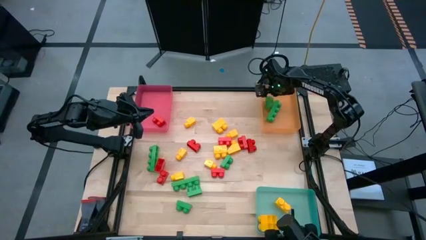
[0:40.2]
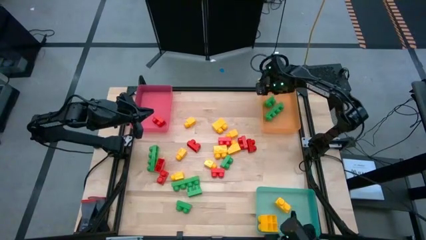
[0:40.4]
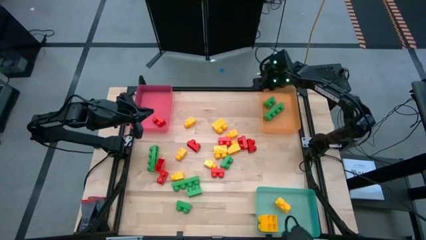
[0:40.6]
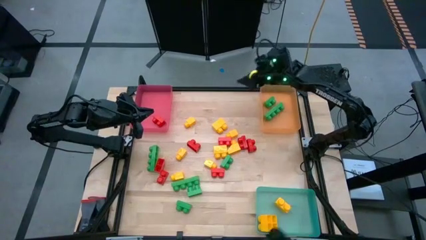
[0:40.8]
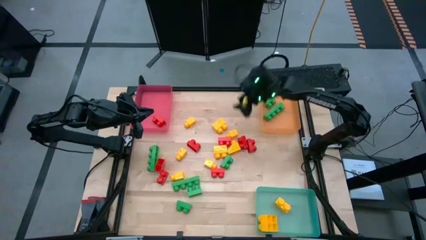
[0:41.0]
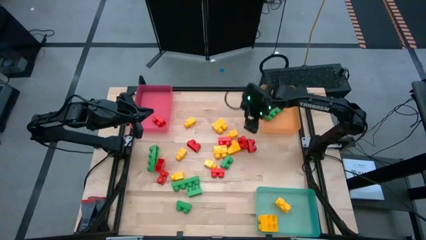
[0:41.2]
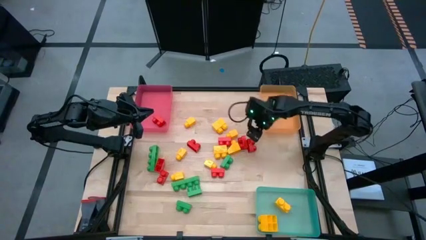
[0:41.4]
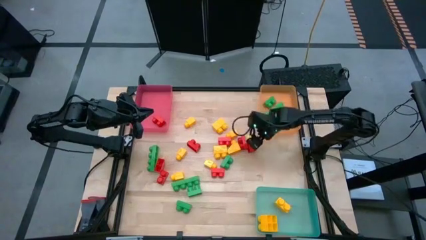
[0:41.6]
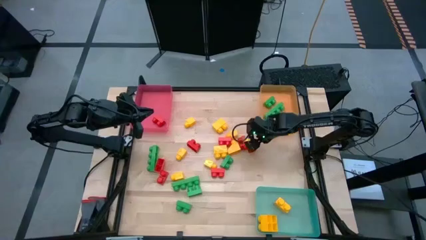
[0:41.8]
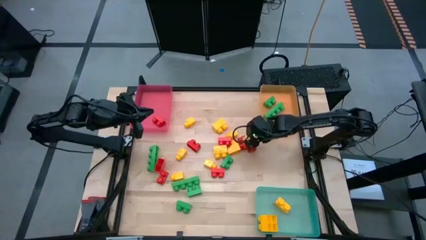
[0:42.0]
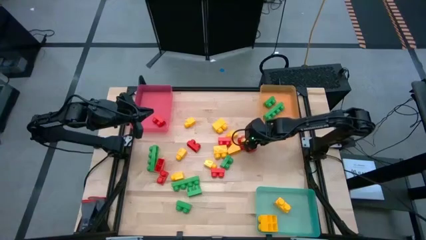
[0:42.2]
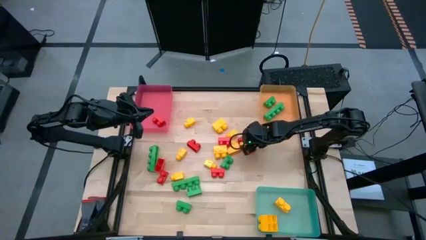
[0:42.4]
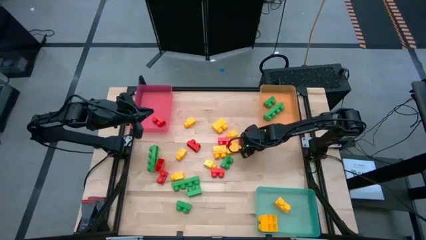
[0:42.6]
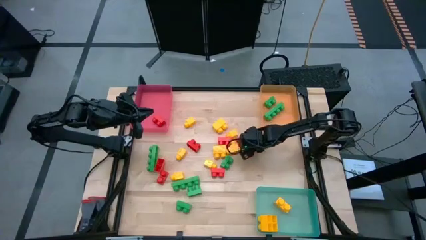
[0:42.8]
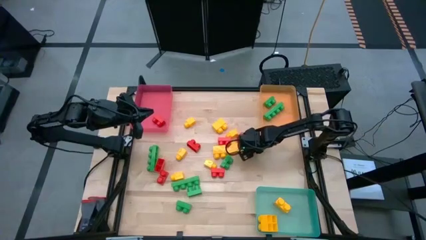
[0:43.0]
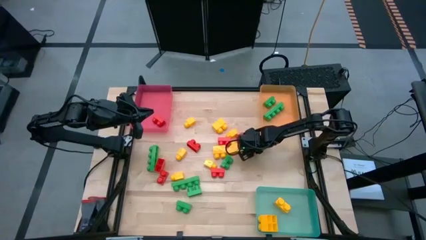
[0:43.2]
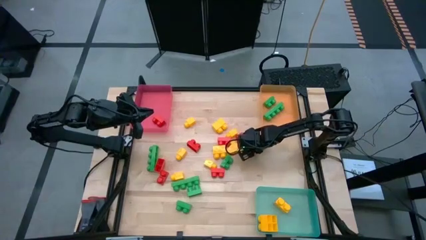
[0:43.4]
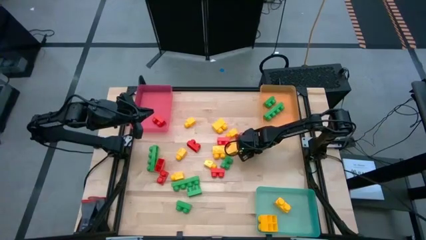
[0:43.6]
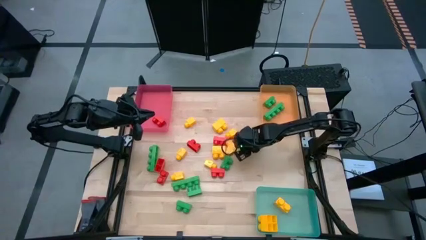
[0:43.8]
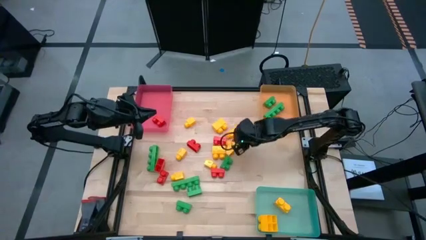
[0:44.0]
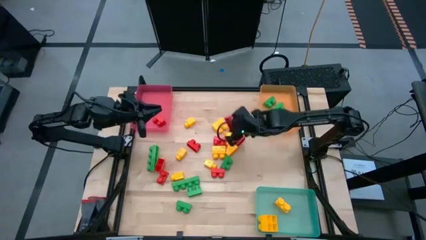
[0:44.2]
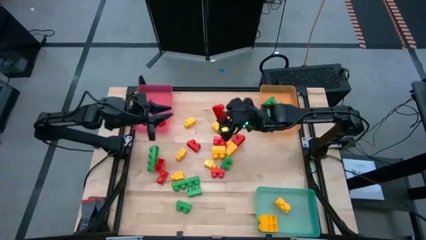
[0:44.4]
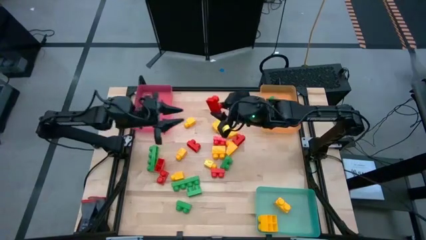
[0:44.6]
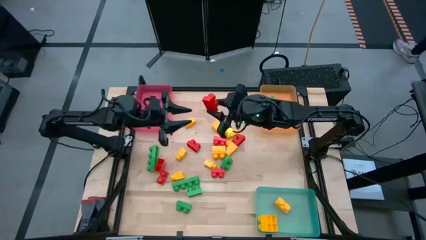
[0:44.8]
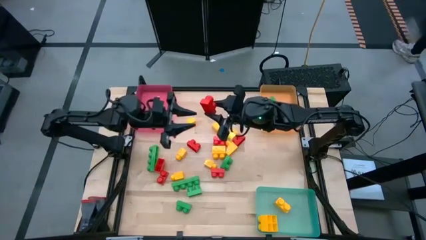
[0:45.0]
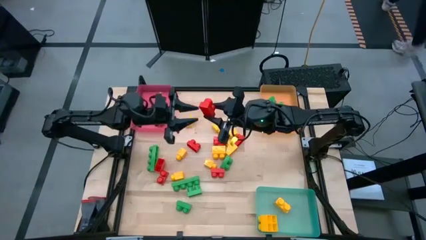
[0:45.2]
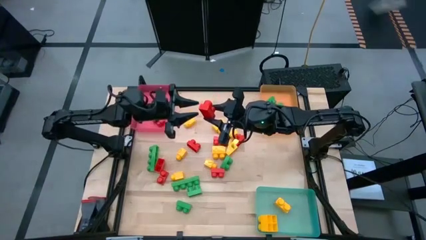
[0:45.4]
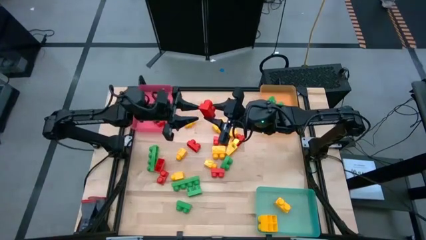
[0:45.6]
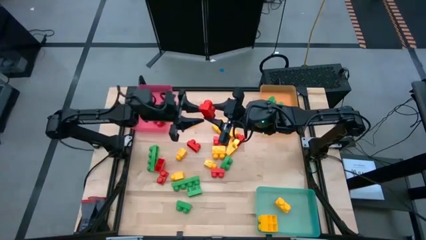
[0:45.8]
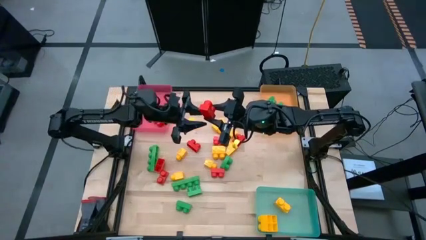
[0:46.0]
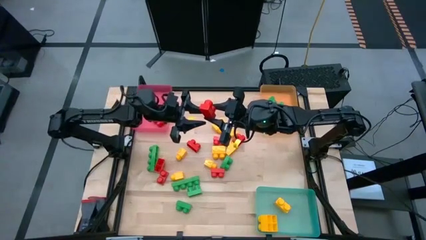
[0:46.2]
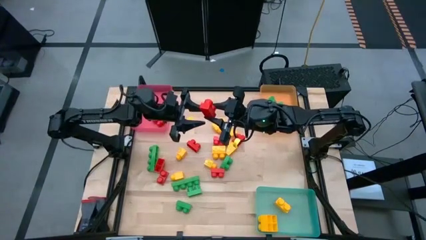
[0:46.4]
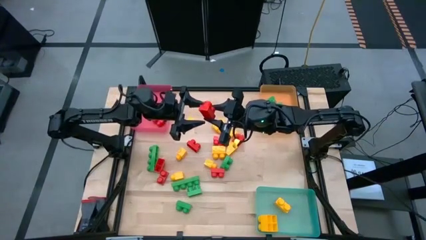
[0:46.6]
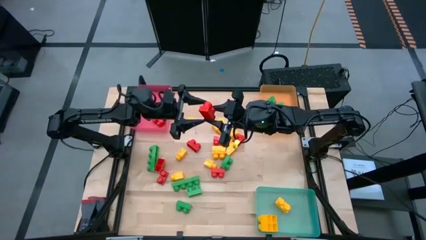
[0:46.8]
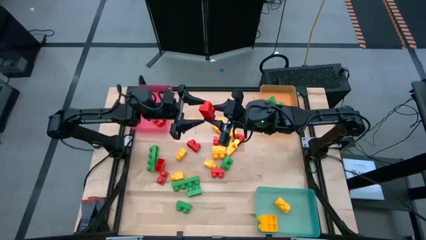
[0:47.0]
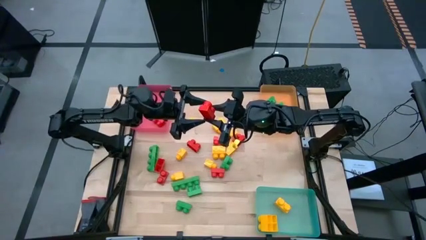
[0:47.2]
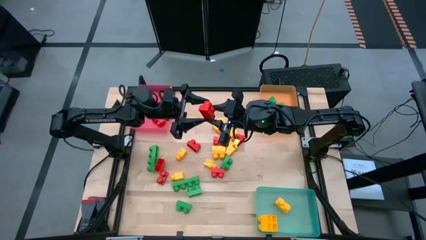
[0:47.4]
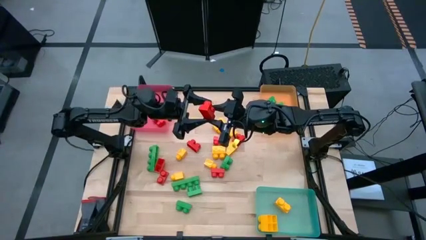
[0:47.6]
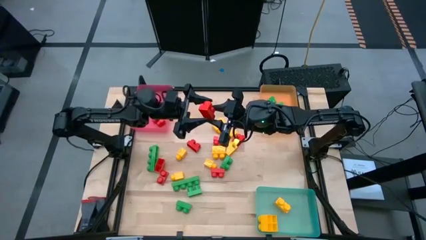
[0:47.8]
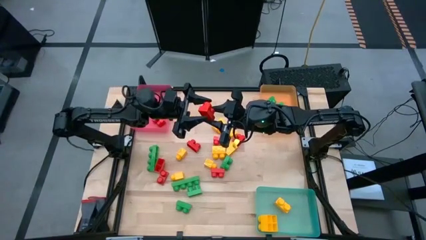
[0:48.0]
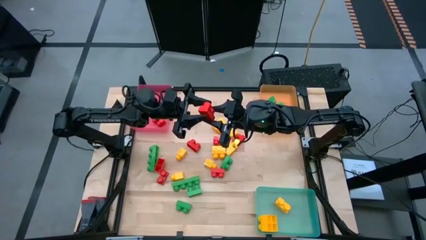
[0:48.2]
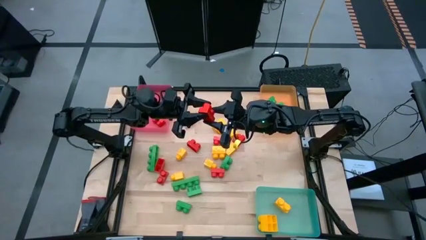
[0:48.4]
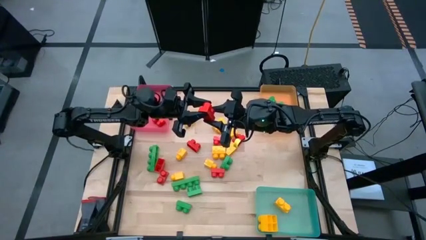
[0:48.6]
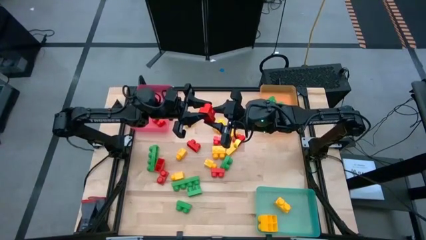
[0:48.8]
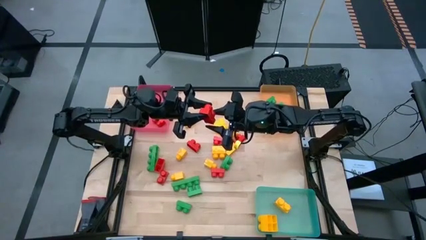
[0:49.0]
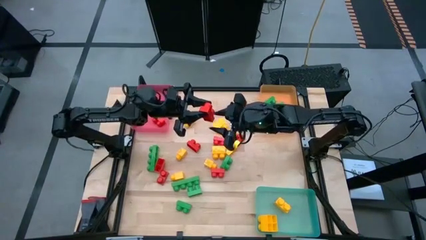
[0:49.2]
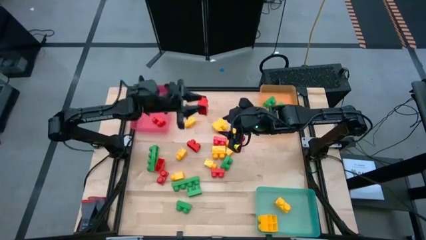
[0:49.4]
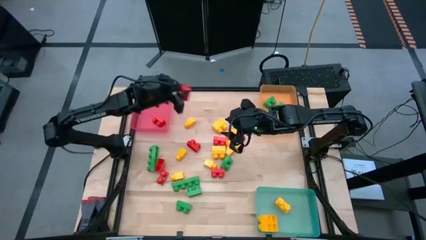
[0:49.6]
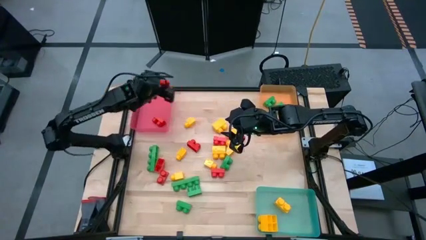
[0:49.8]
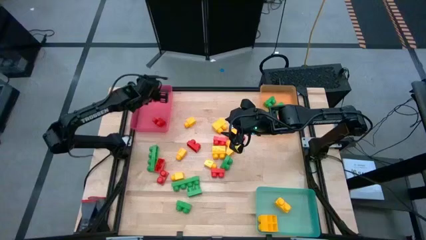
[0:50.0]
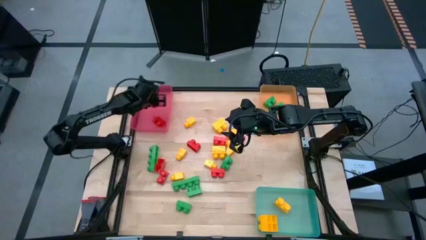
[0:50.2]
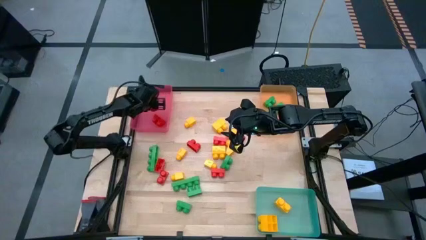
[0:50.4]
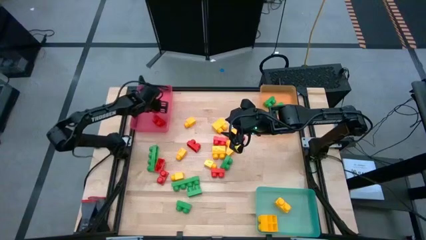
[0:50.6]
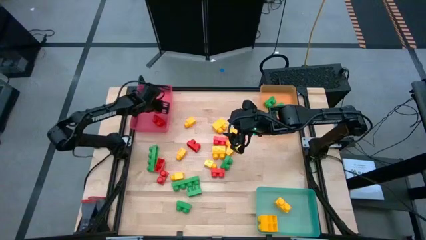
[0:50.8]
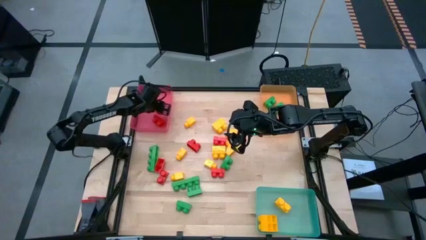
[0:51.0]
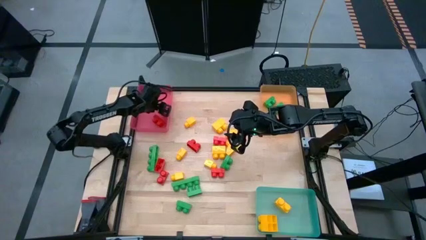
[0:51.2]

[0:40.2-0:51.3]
Task: Sort blocks
Put the red game piece into the red bin

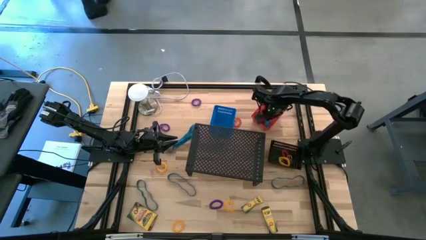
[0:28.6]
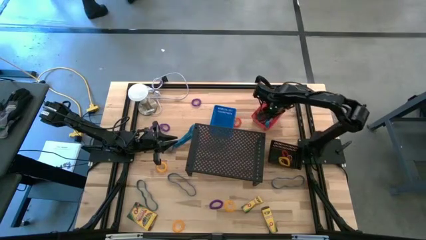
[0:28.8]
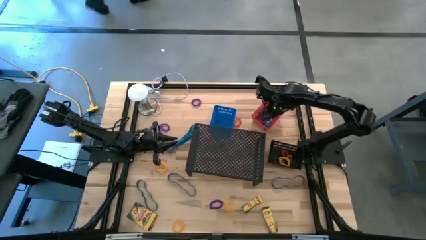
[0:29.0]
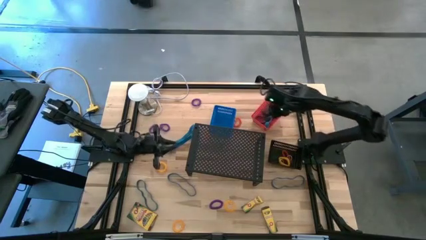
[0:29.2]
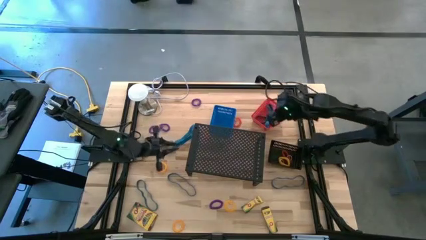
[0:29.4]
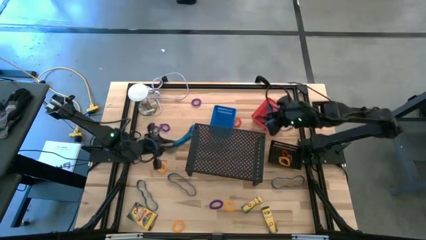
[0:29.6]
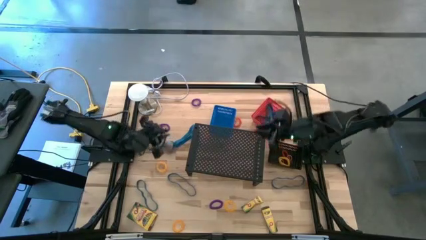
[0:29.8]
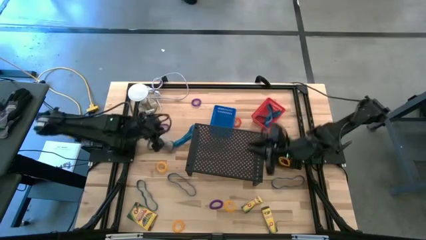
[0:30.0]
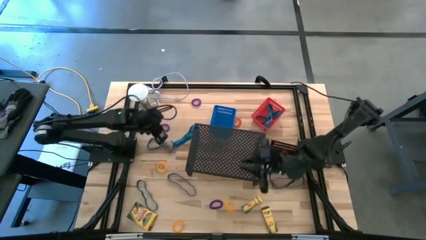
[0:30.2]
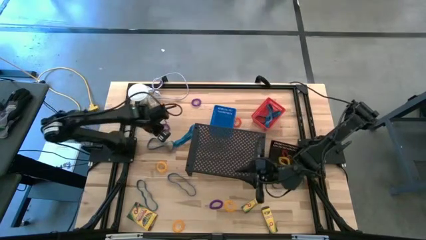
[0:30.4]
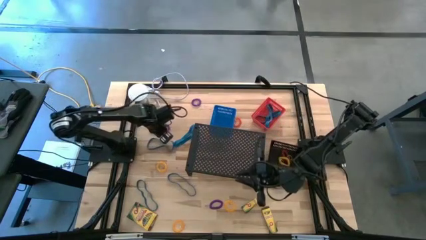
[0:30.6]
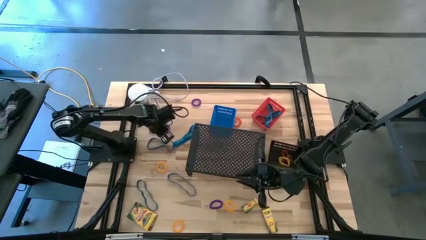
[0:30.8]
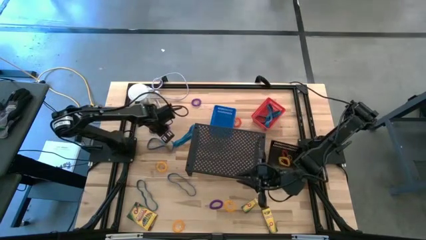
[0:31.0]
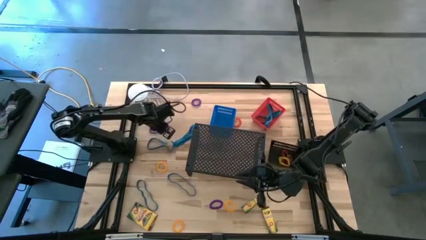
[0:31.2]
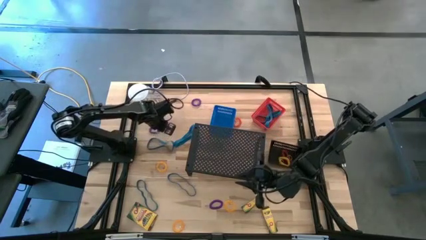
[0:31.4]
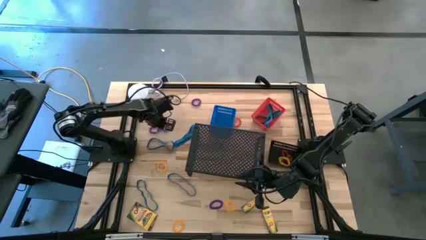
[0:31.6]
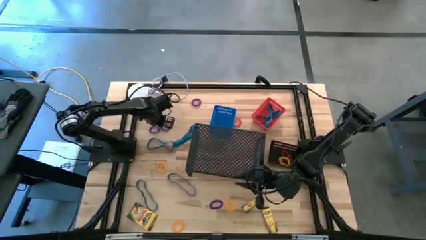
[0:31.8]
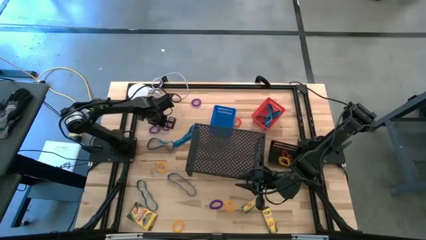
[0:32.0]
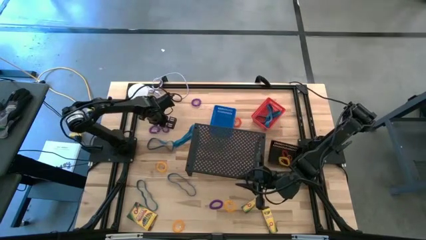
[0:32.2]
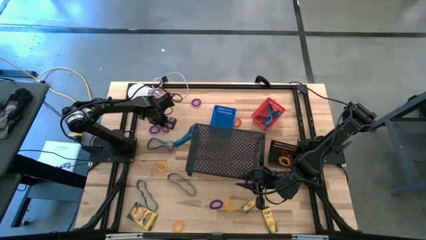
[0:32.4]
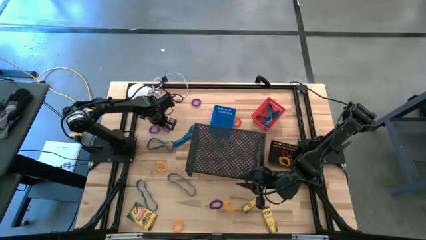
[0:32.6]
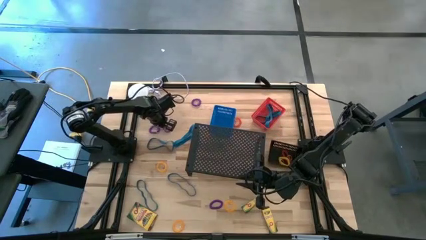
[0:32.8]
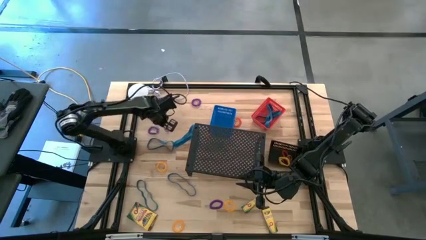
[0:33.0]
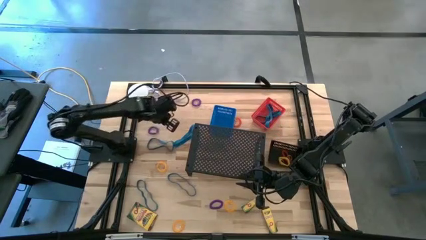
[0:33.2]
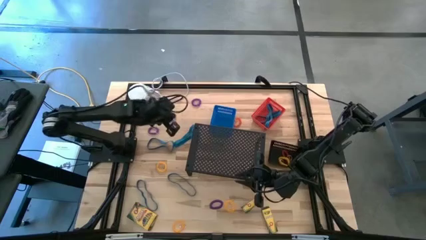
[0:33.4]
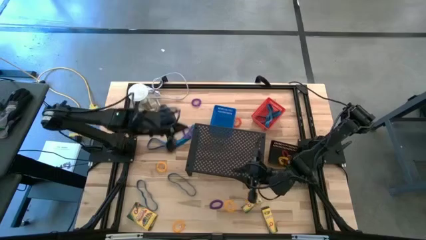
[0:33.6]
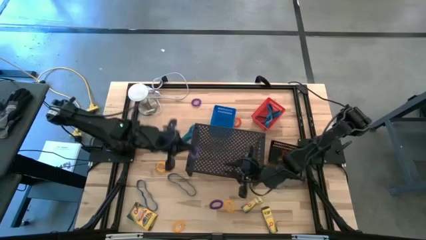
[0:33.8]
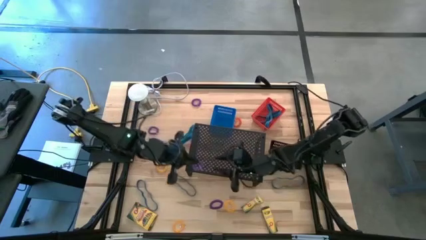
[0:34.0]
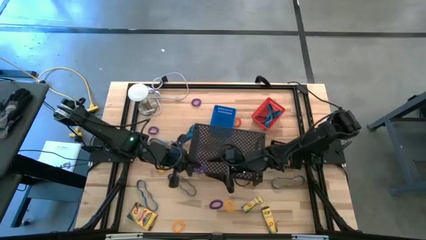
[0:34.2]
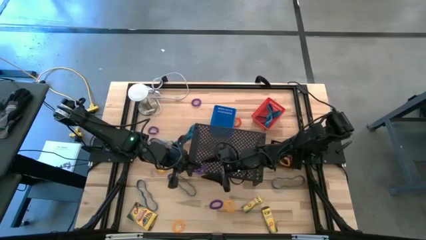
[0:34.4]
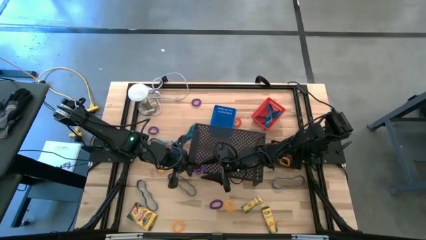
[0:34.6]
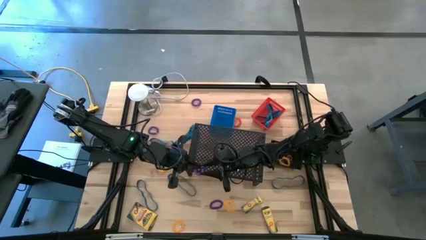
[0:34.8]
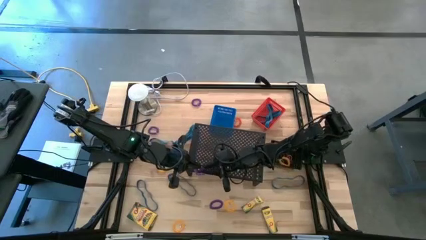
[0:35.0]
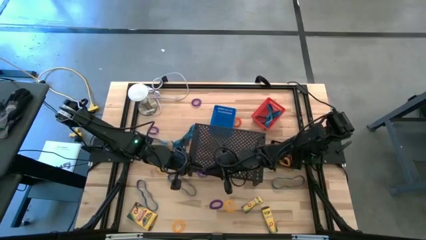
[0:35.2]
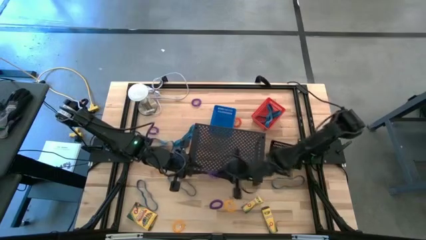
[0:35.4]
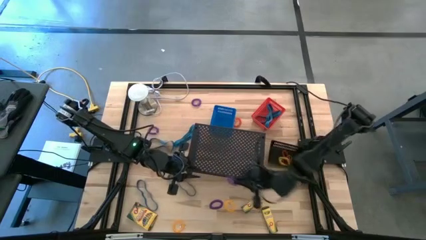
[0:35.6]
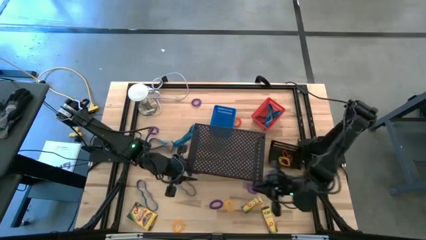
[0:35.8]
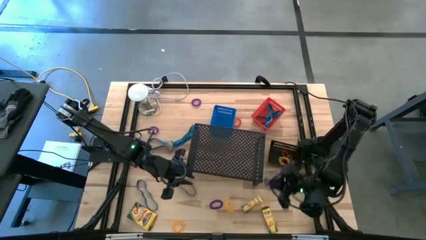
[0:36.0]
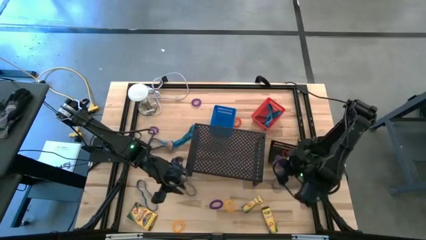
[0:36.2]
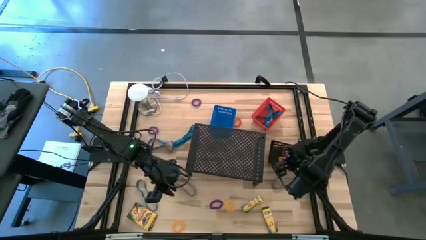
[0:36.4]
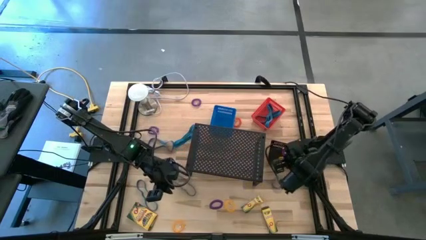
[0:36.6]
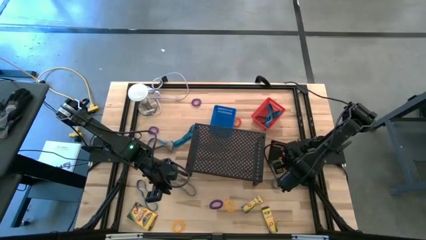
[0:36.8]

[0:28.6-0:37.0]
Task: Pick & Place Office Desk Supplies
Put the purple spiral keychain into the black bin
